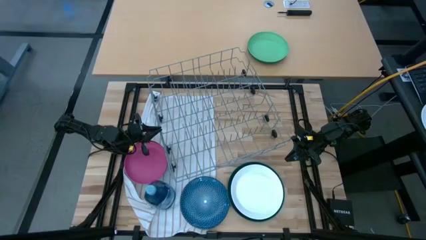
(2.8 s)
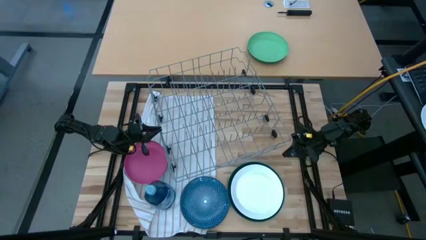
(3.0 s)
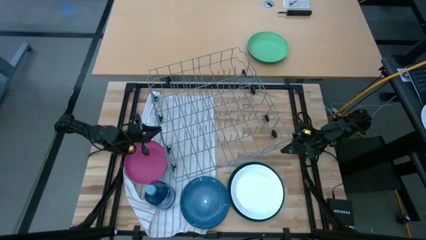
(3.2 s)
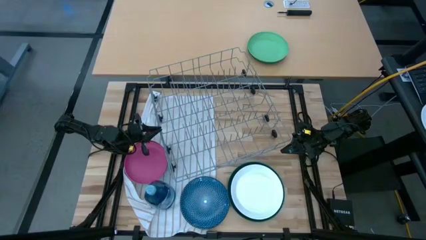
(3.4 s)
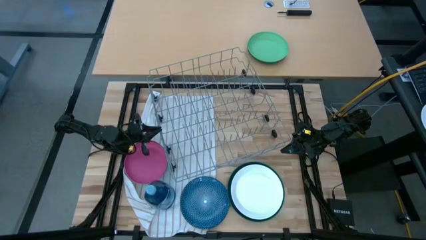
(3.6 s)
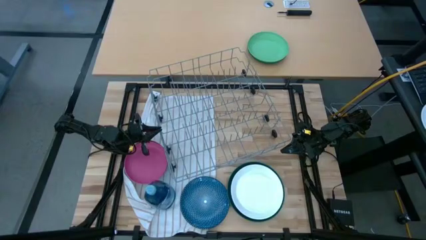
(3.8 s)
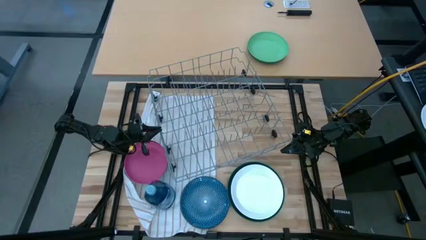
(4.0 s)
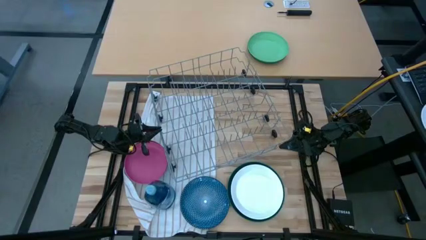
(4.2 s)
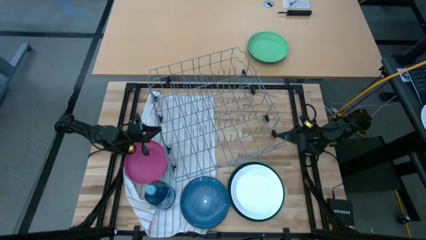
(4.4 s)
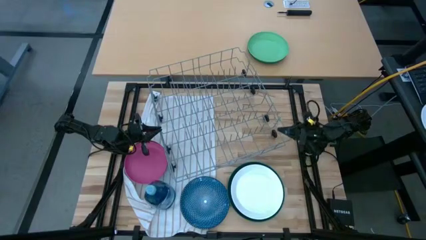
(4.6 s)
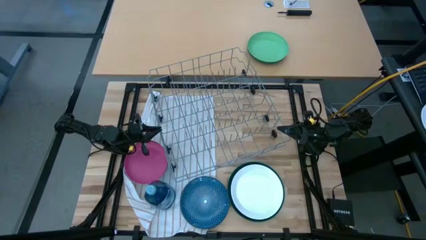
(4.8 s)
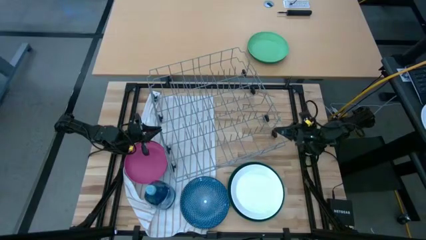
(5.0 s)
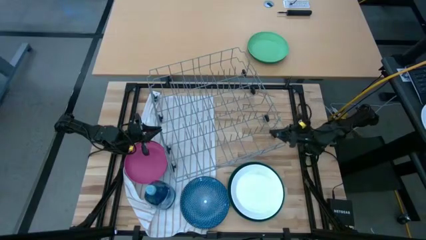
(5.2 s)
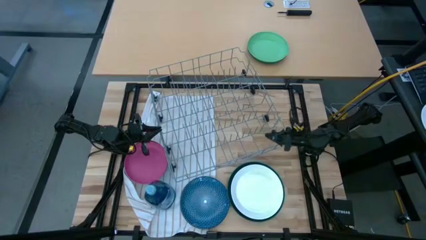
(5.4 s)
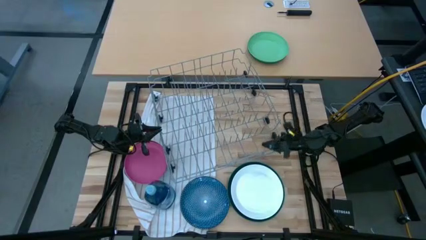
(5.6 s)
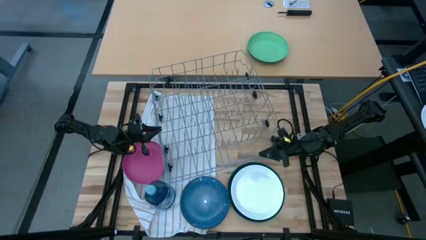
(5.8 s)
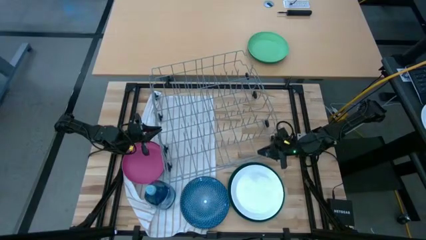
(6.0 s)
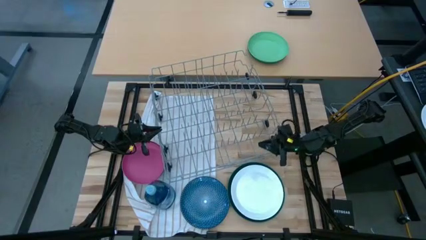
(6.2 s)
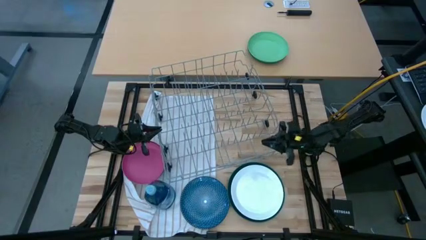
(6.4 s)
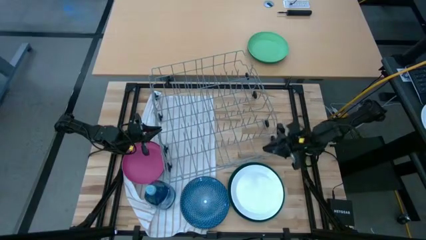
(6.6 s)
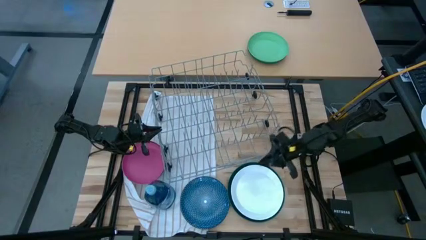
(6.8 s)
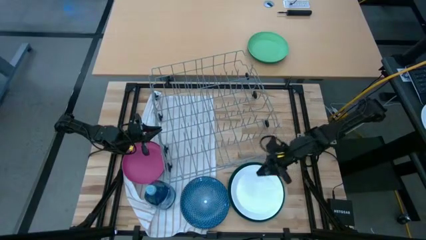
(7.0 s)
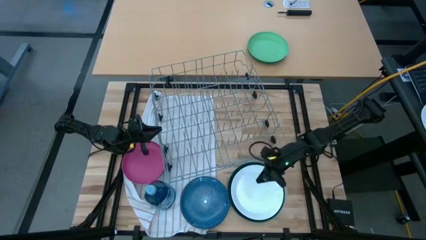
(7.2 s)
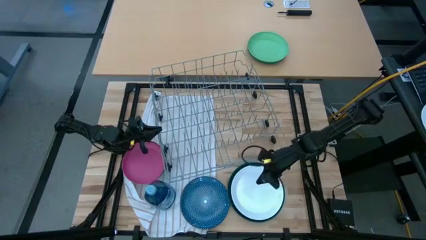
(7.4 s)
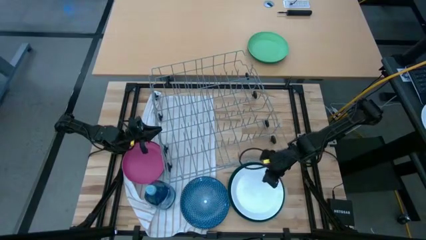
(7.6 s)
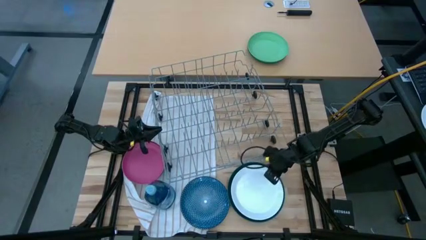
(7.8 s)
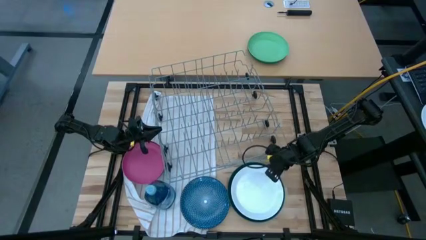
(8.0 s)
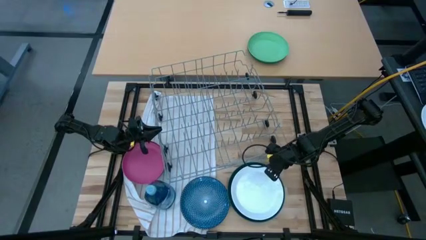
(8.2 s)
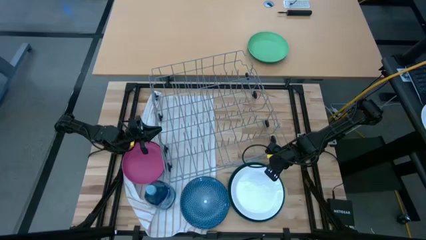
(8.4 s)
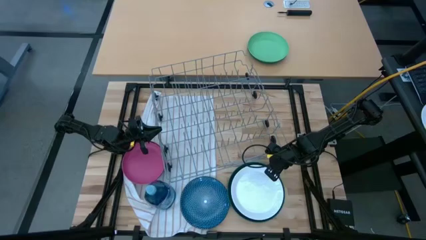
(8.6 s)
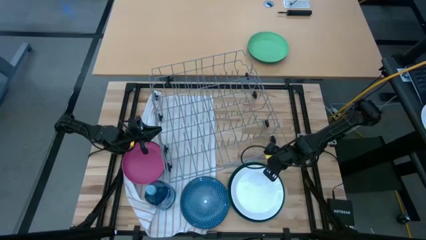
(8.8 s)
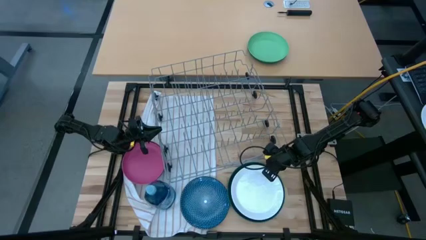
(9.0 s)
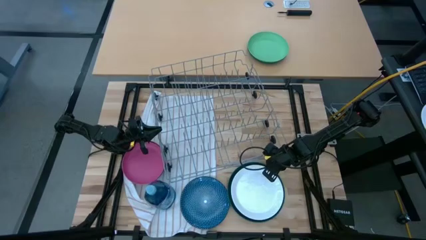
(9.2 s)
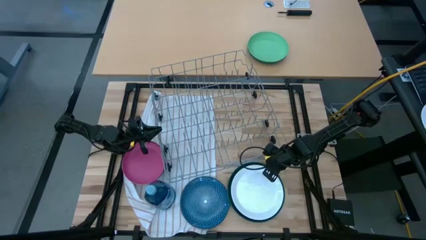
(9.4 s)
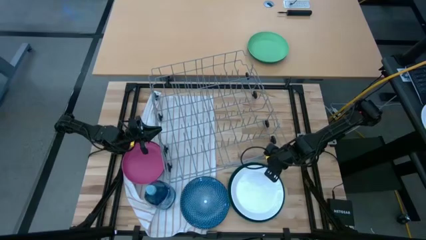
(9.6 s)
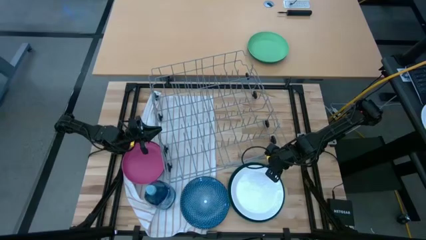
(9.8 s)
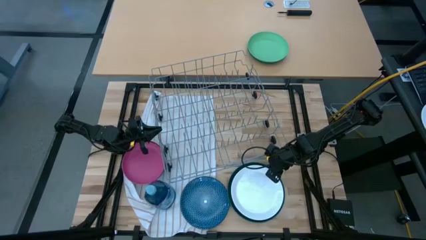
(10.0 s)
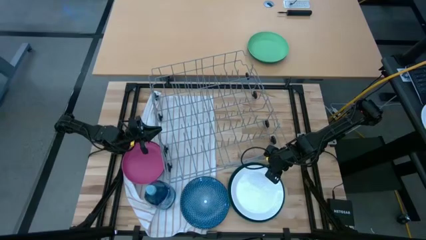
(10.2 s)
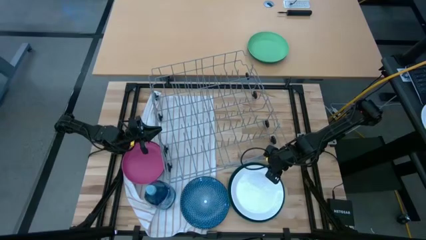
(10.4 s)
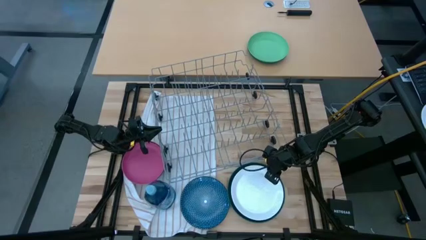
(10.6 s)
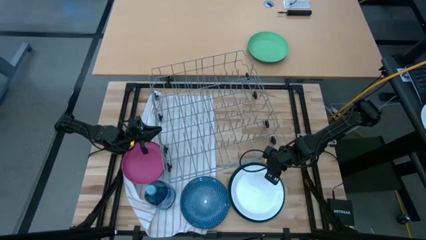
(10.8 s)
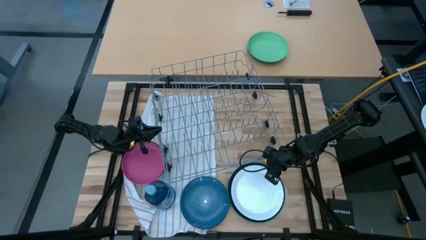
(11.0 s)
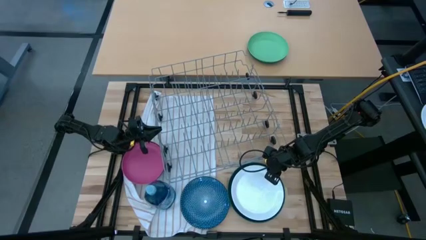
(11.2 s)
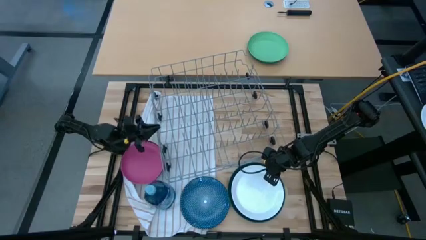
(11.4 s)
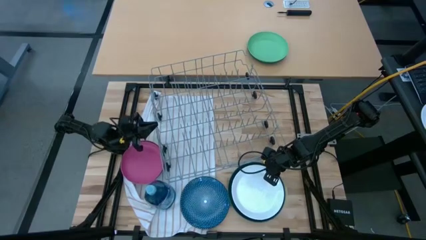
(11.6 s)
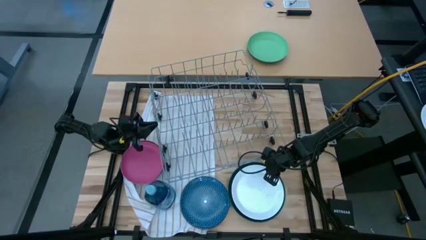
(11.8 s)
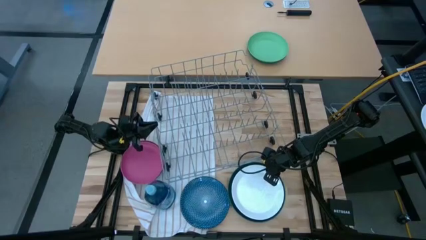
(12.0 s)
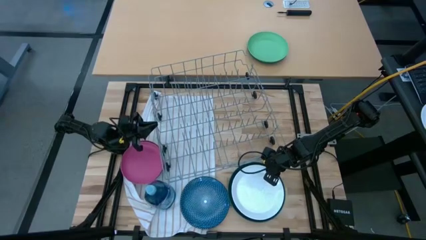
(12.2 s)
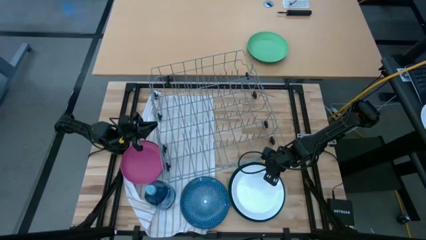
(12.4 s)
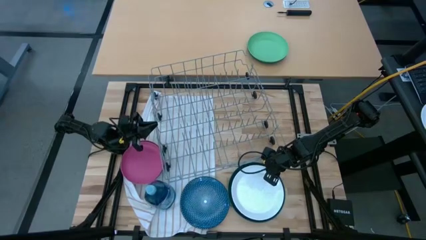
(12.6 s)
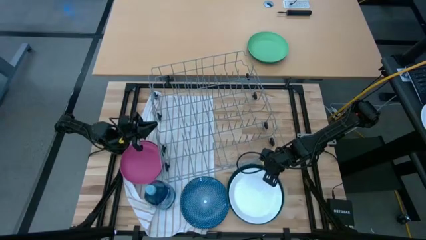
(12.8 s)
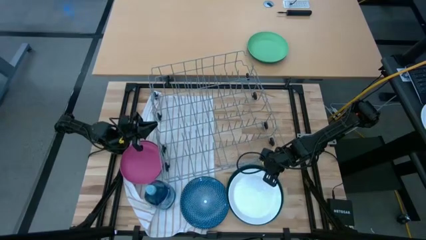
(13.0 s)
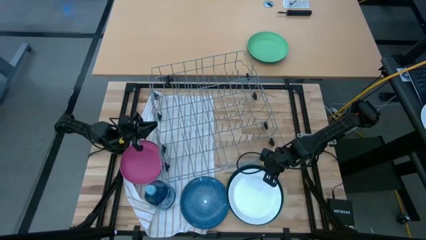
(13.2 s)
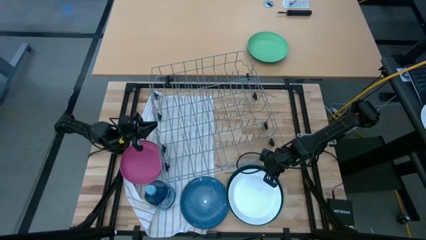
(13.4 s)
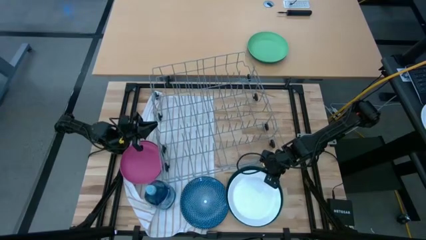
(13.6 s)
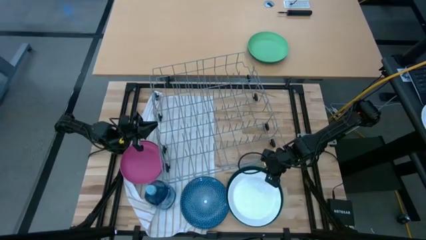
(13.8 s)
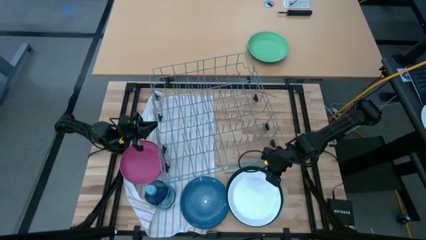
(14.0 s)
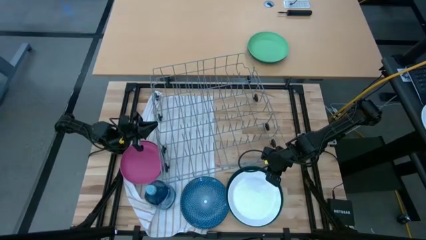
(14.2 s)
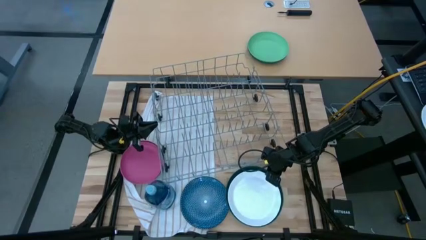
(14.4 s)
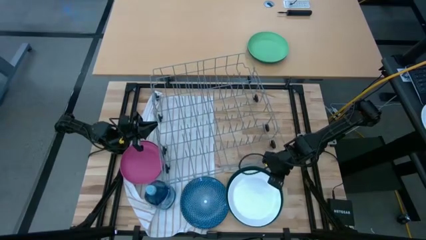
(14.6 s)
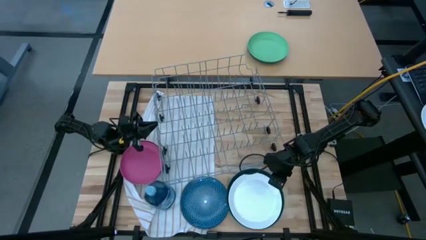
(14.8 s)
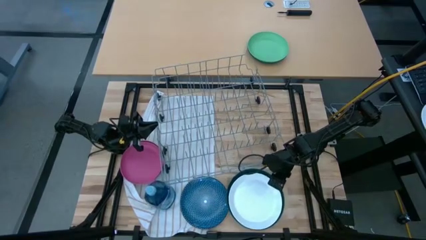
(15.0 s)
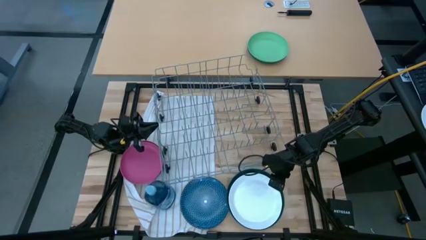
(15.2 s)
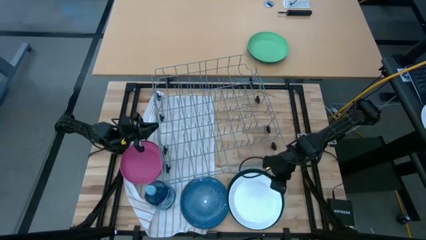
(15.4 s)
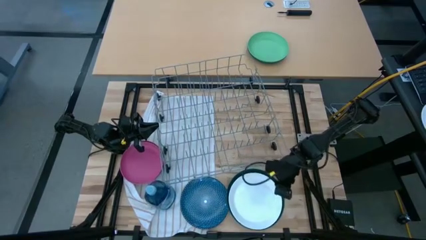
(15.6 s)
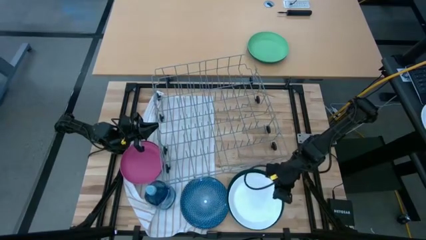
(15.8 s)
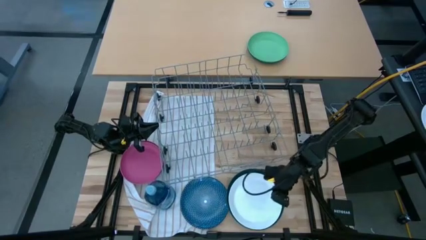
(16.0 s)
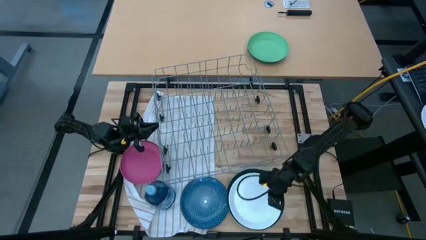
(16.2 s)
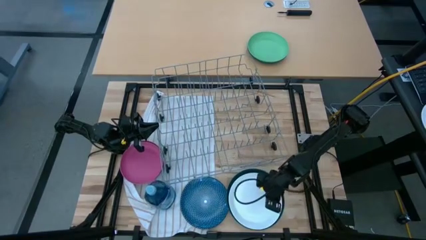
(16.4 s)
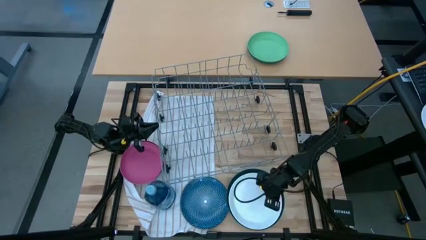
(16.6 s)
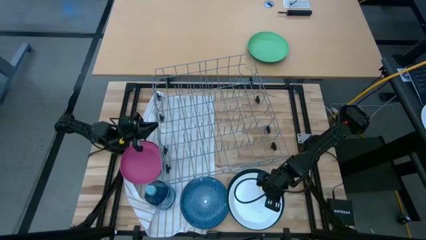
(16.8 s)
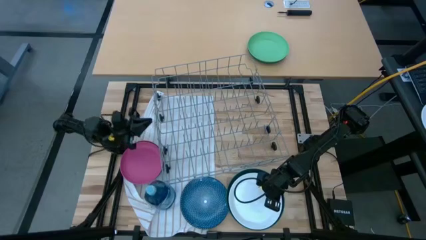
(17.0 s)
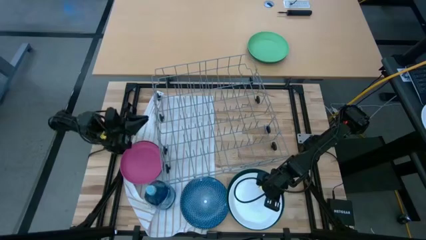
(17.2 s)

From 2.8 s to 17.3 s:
Task: Sort dishes
Put the white plate into the dish rack
